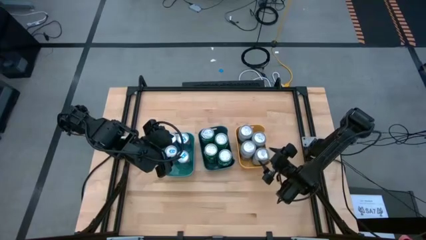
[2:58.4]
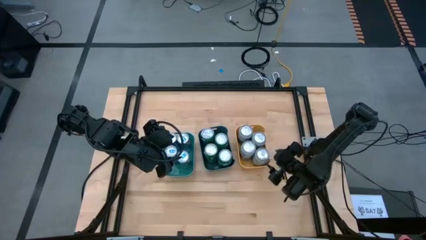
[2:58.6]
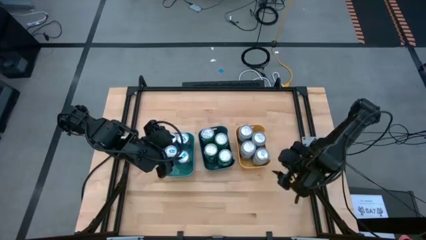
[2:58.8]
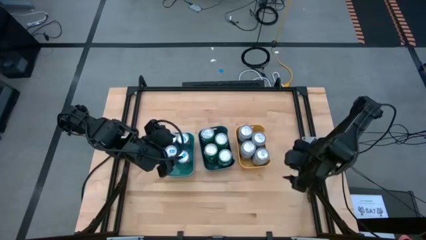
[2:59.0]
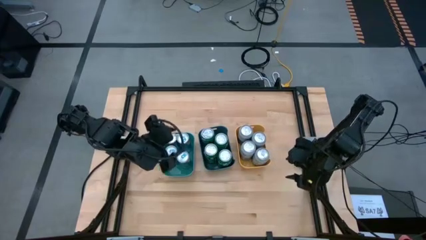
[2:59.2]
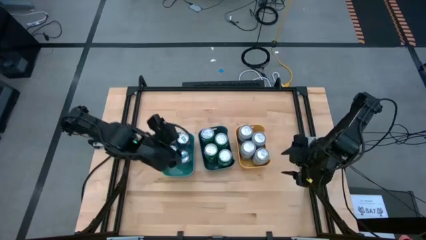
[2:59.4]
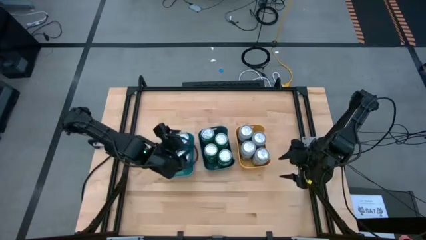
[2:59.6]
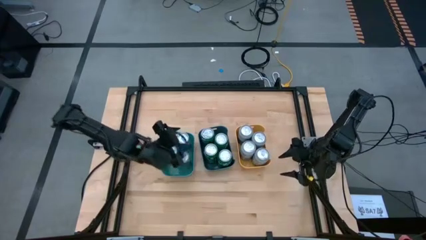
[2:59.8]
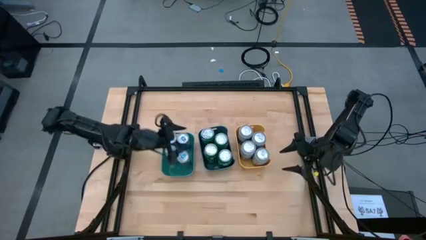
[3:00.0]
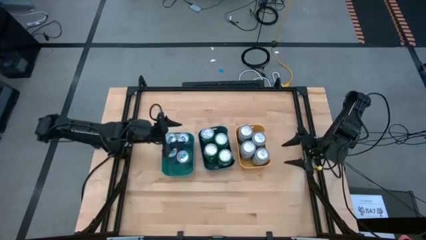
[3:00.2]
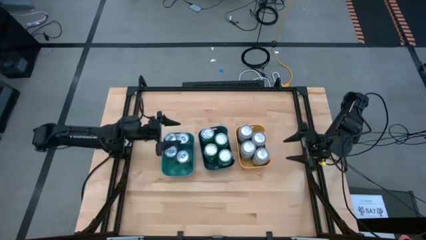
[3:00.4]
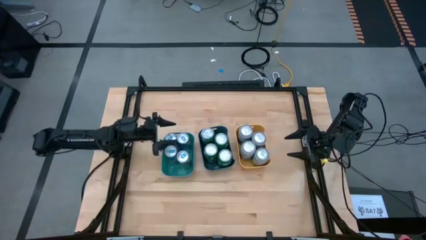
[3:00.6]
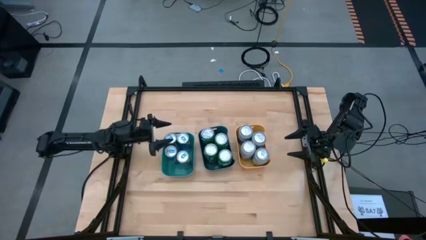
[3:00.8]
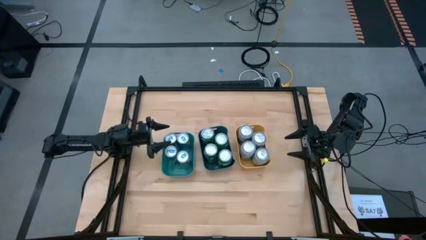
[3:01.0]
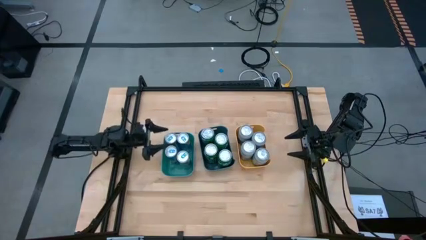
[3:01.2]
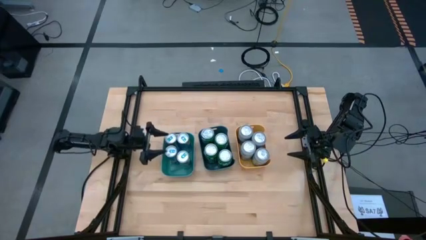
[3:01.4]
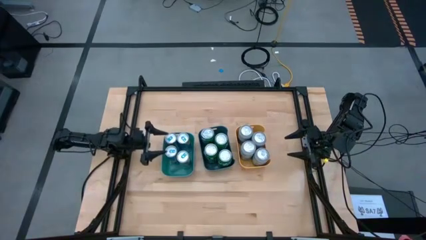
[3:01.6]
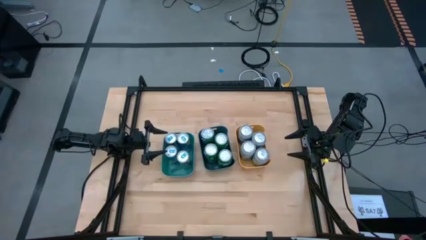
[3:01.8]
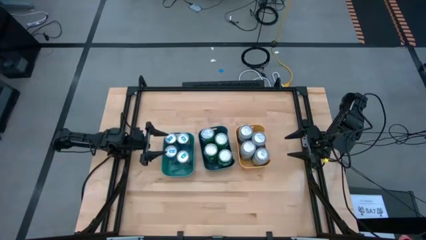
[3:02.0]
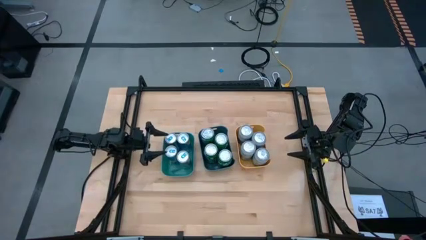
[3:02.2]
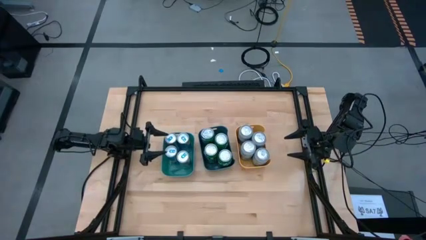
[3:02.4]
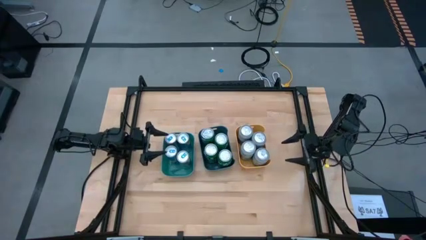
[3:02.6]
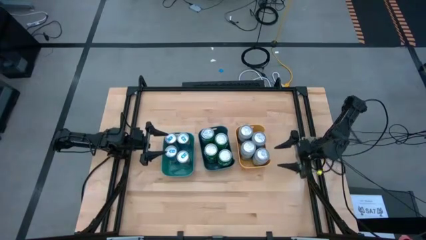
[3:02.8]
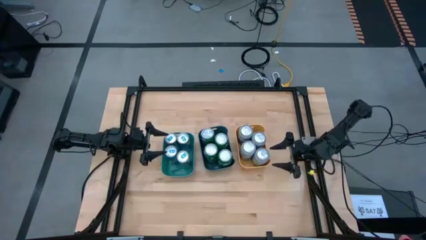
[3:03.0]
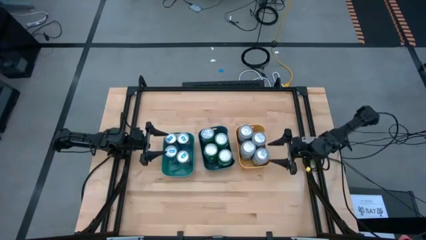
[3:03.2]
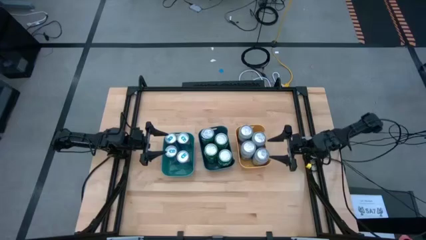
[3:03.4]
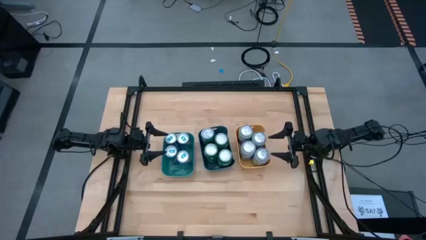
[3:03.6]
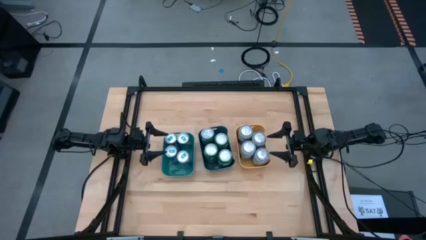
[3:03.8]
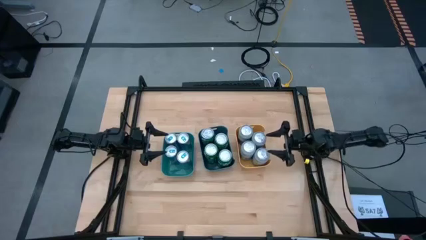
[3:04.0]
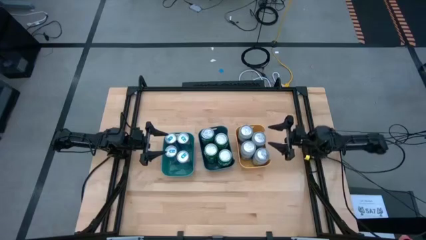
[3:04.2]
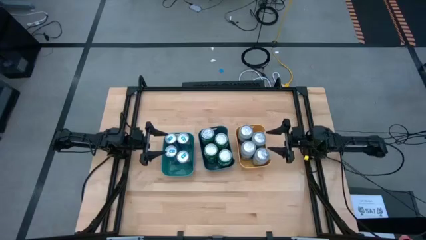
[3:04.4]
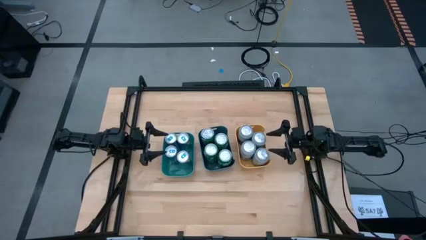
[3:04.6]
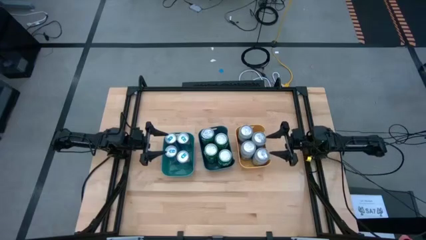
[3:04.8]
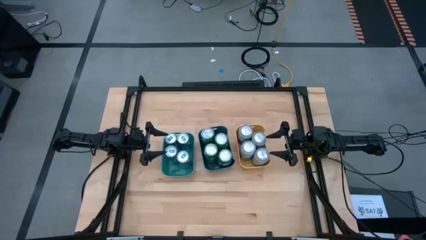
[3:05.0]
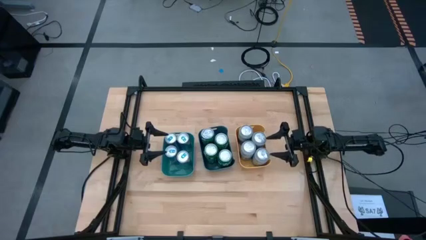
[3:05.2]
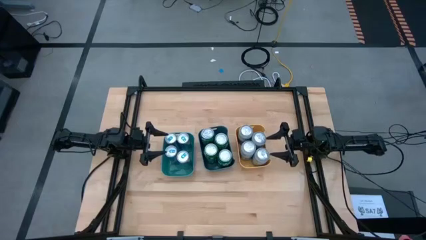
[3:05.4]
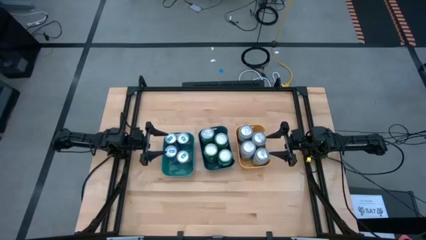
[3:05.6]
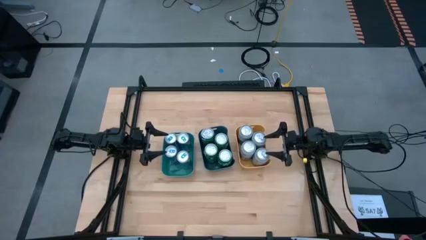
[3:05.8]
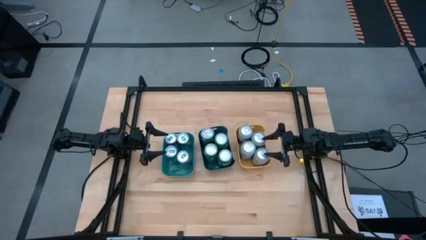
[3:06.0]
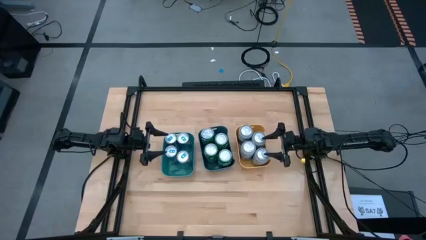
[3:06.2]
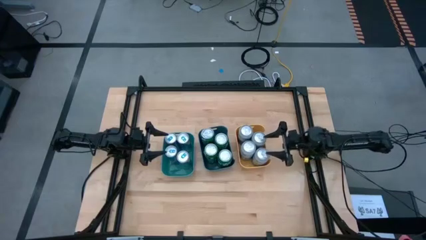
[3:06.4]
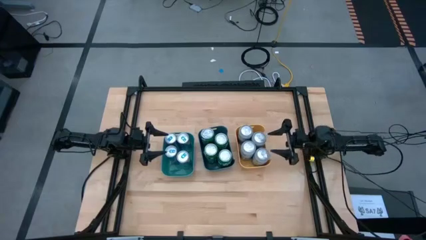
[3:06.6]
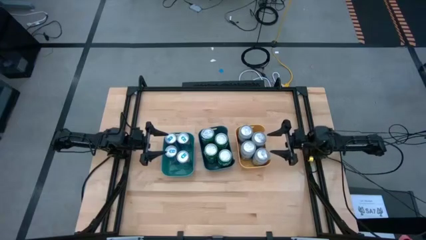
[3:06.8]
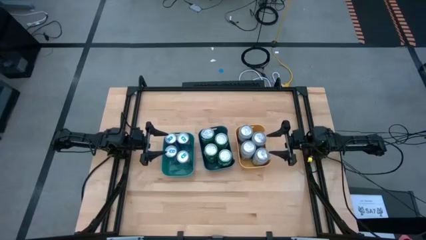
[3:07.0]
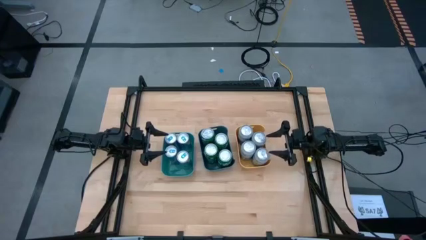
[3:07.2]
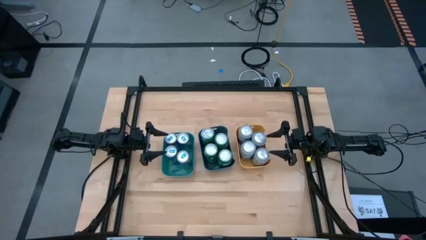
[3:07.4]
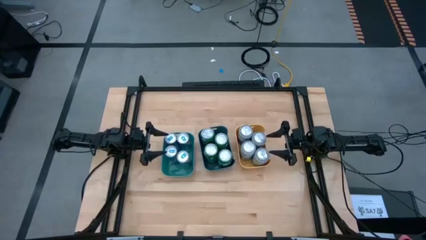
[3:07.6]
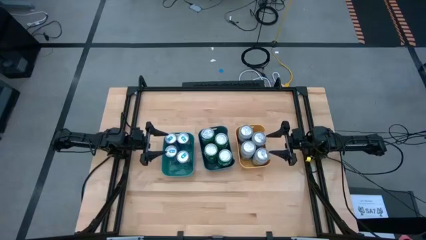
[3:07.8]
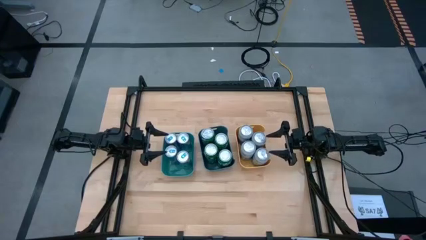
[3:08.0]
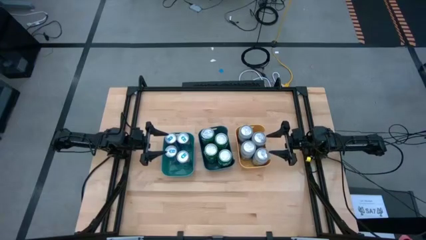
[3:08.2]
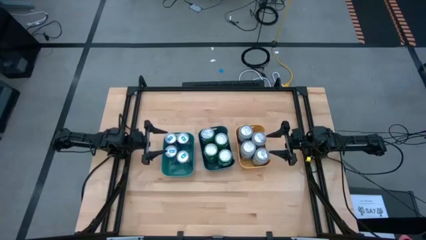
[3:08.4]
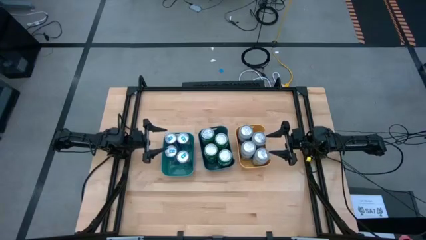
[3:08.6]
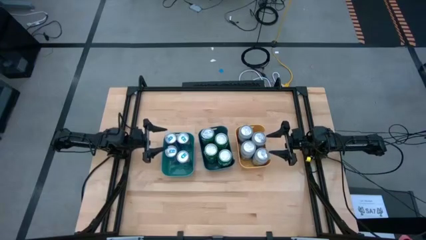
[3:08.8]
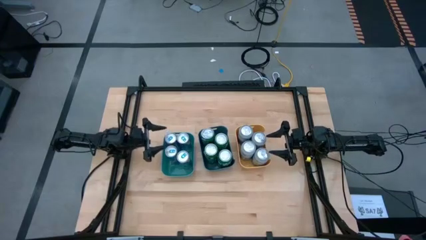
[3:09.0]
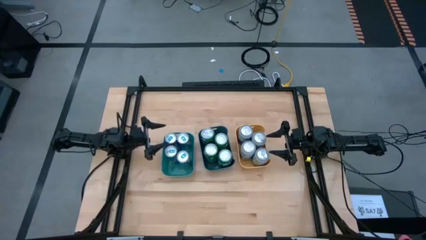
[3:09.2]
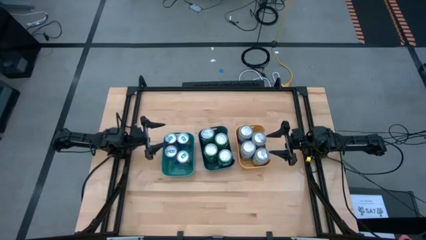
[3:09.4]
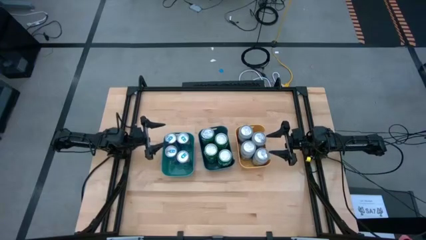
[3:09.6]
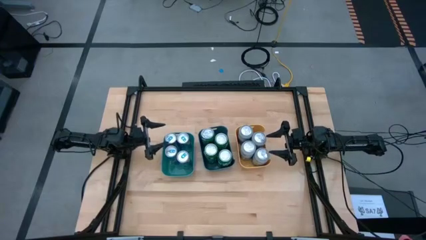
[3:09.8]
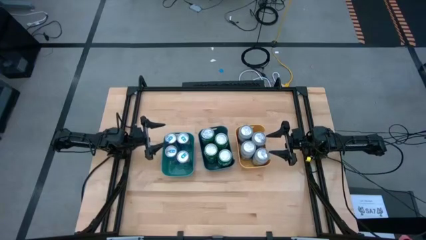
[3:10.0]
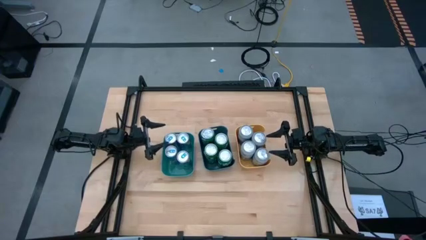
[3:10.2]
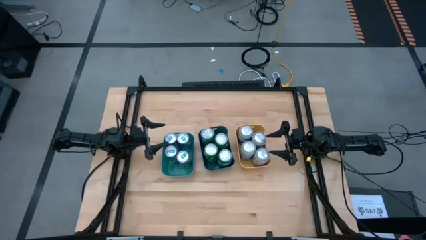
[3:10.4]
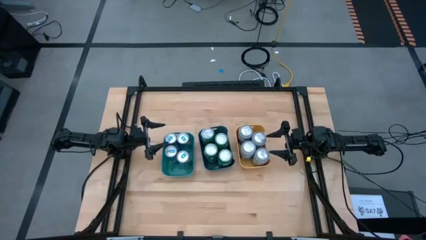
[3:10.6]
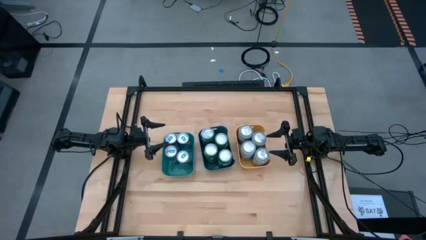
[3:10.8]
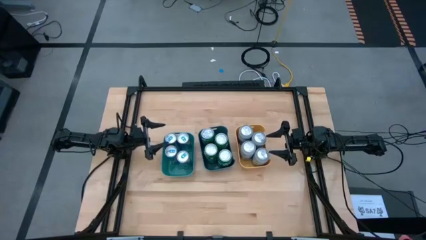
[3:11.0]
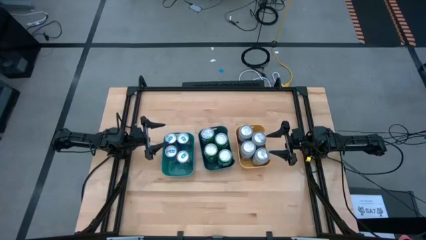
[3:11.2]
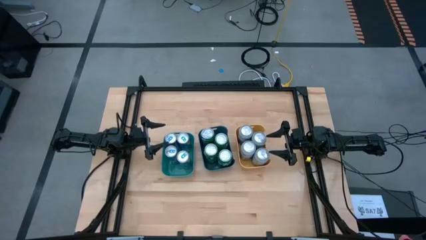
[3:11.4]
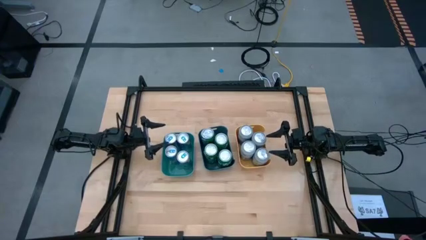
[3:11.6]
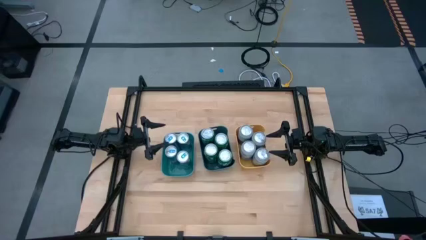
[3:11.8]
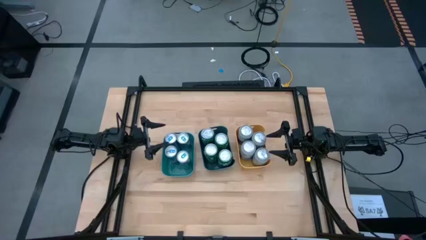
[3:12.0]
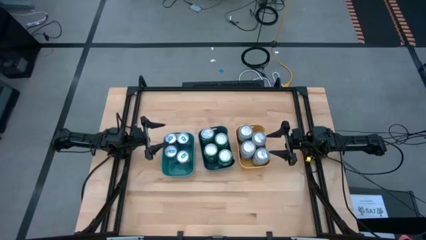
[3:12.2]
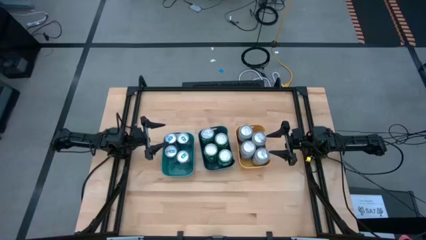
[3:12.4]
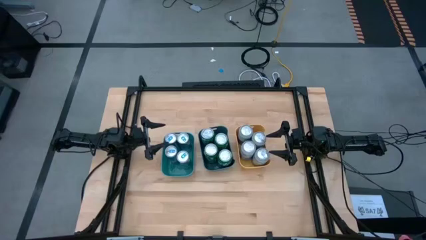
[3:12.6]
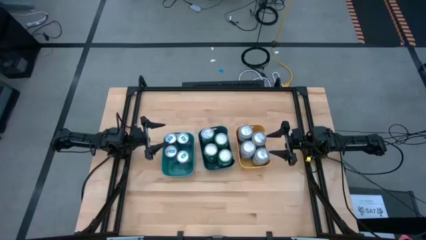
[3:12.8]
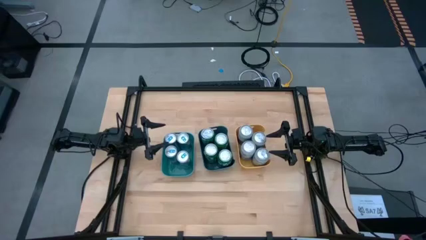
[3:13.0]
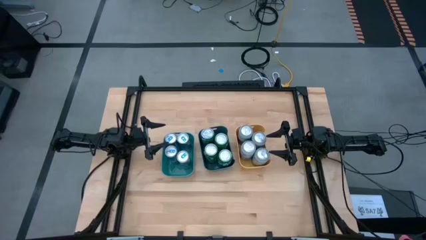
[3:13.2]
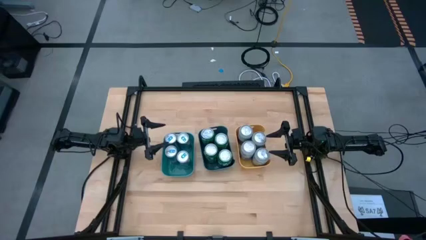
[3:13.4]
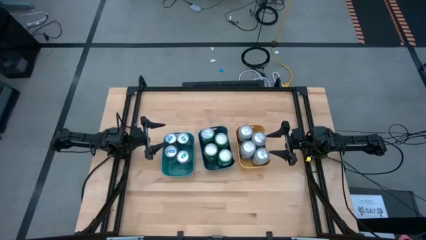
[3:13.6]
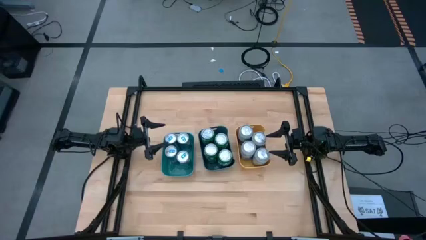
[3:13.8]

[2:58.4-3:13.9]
Task: Sort soda cans
Return to Home Position
